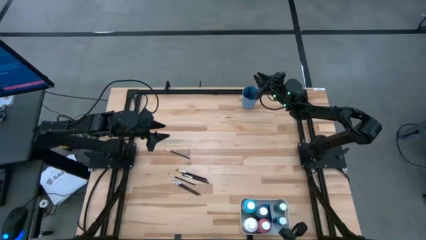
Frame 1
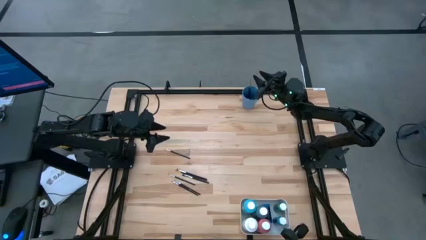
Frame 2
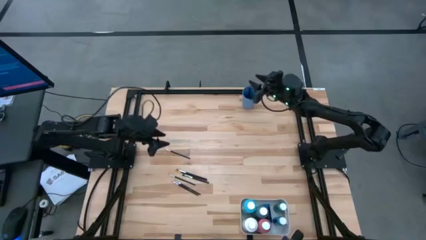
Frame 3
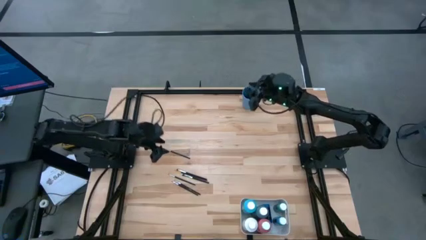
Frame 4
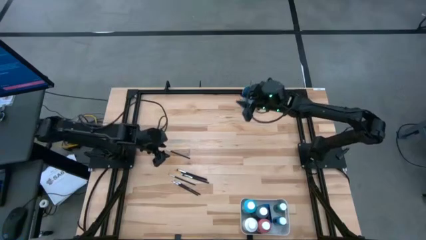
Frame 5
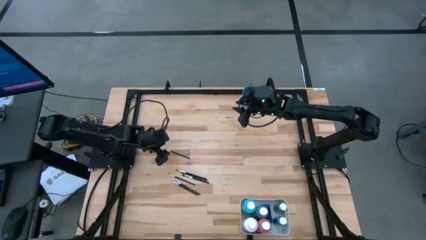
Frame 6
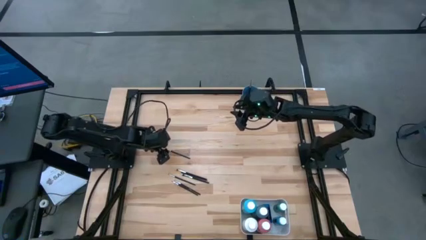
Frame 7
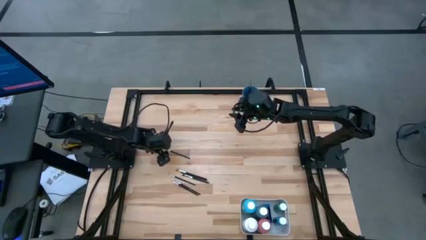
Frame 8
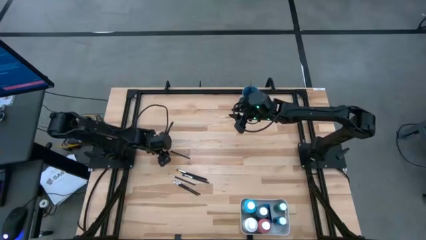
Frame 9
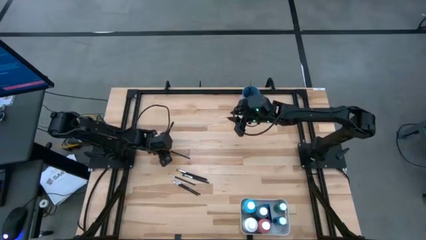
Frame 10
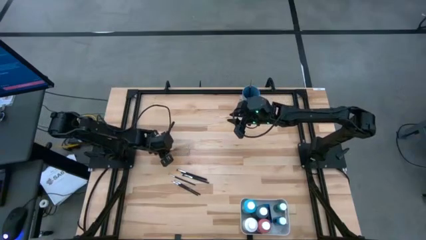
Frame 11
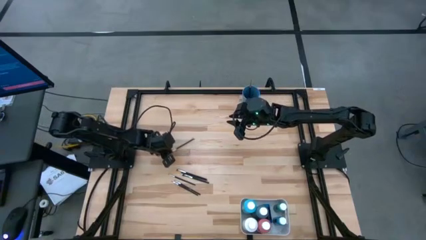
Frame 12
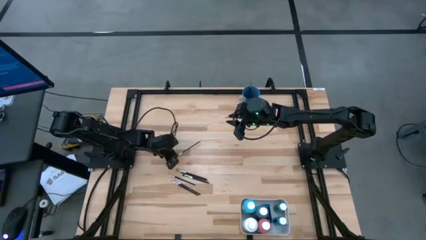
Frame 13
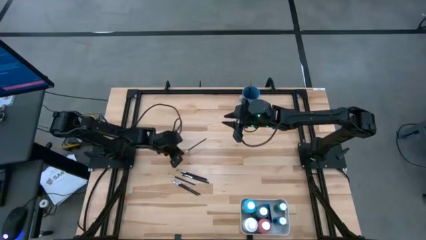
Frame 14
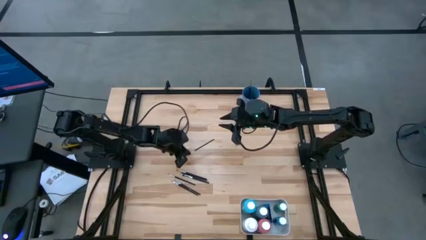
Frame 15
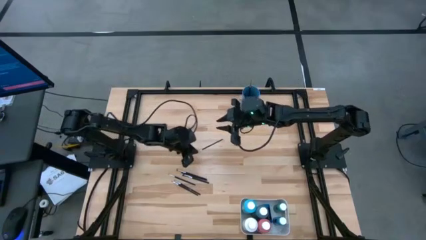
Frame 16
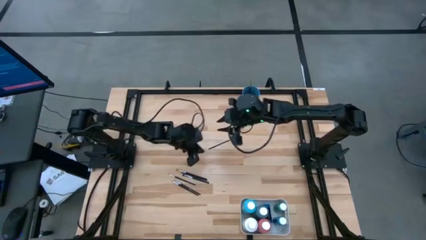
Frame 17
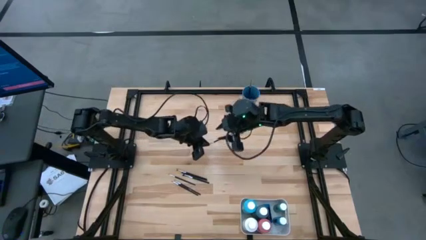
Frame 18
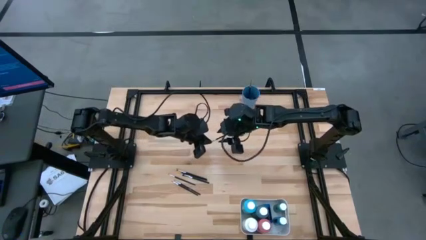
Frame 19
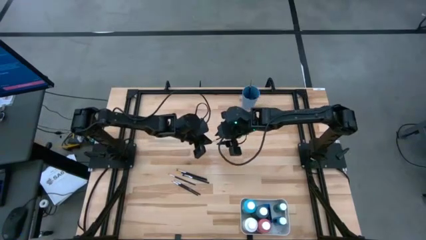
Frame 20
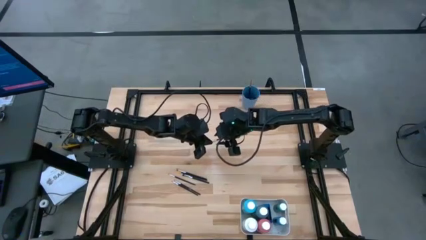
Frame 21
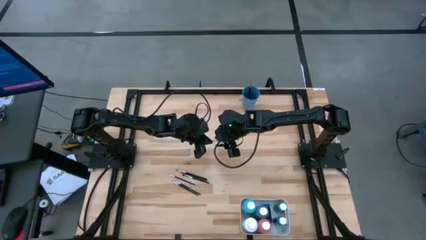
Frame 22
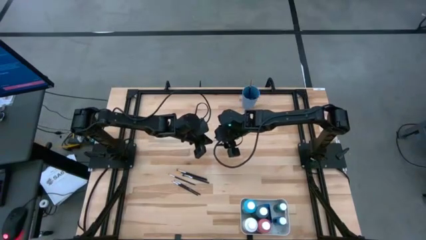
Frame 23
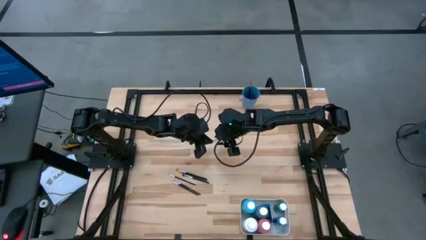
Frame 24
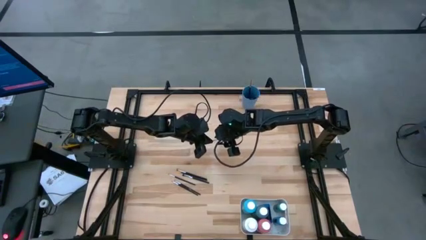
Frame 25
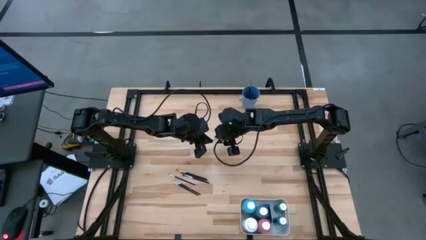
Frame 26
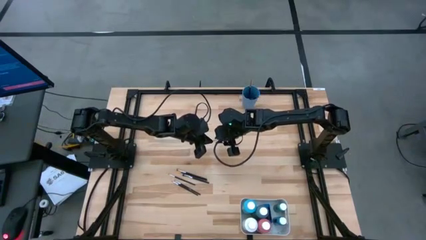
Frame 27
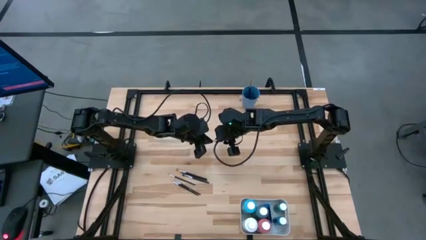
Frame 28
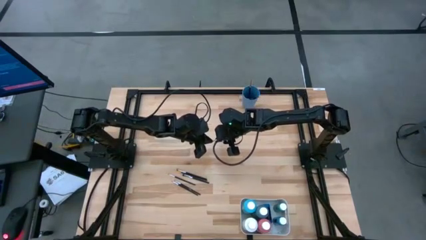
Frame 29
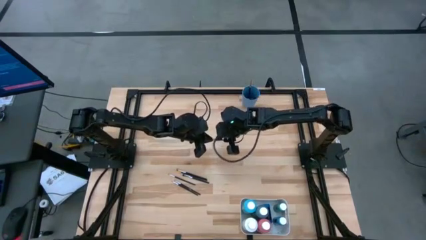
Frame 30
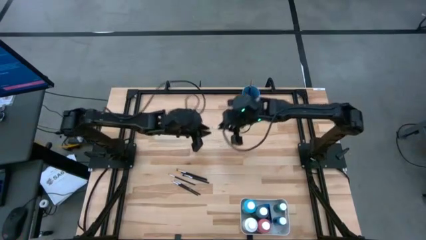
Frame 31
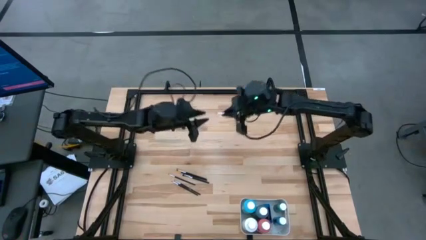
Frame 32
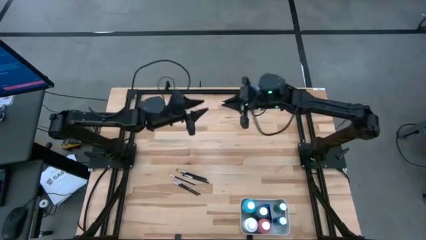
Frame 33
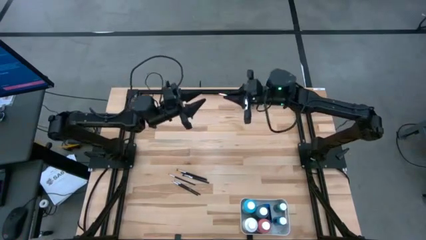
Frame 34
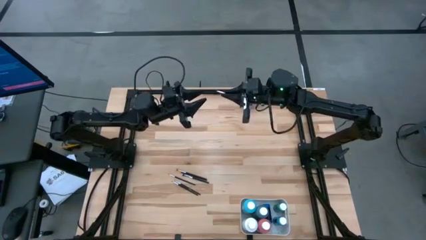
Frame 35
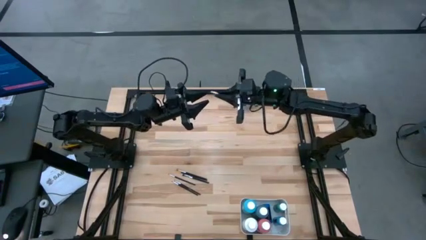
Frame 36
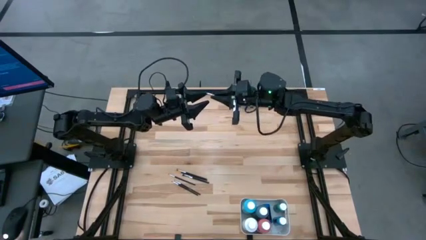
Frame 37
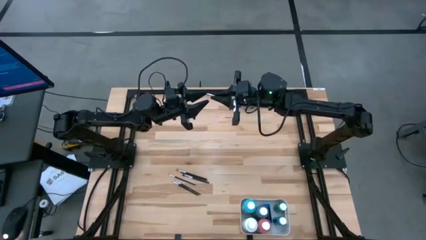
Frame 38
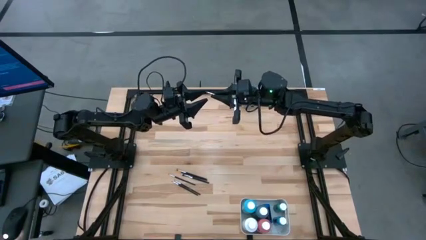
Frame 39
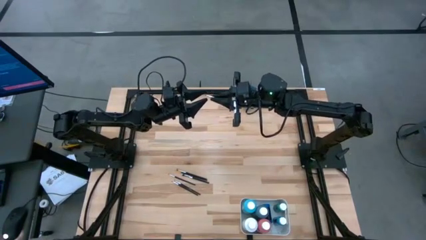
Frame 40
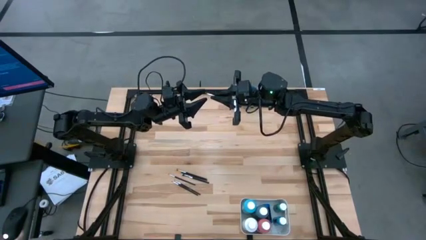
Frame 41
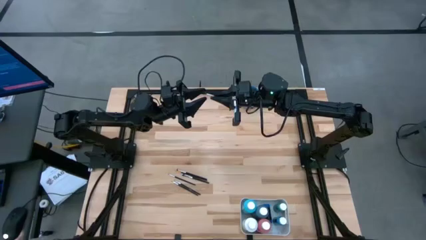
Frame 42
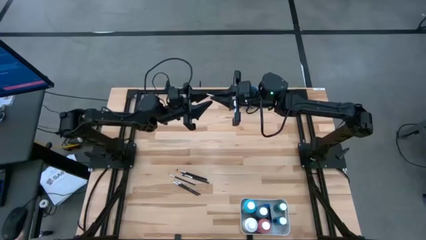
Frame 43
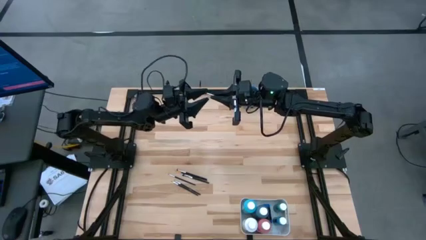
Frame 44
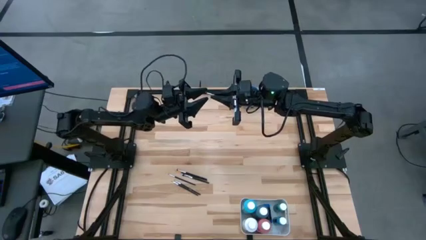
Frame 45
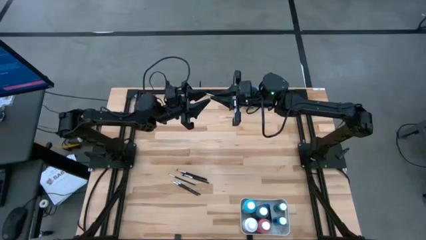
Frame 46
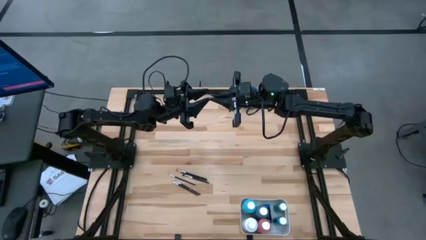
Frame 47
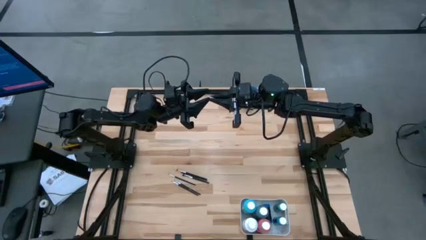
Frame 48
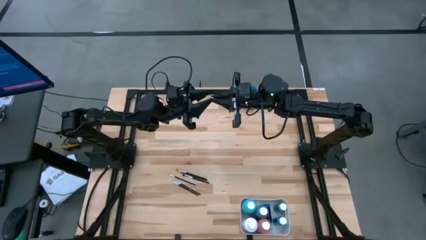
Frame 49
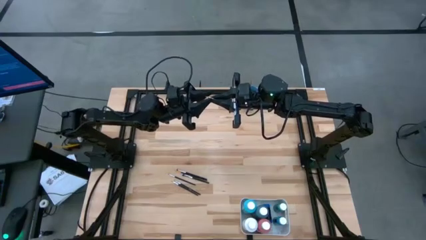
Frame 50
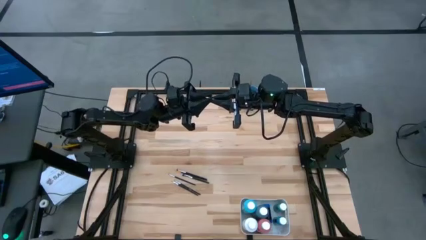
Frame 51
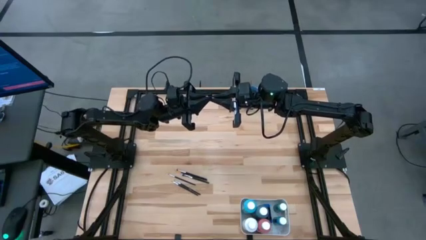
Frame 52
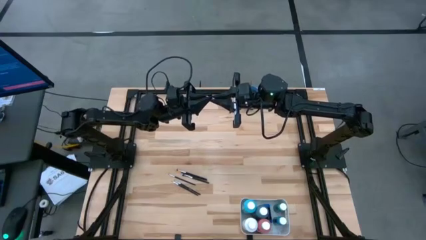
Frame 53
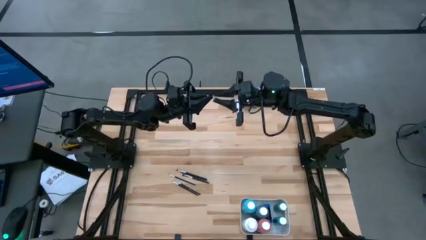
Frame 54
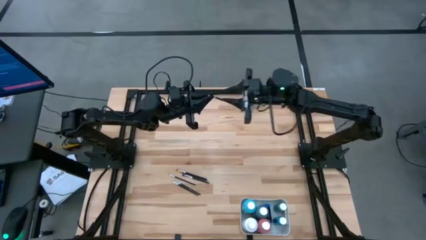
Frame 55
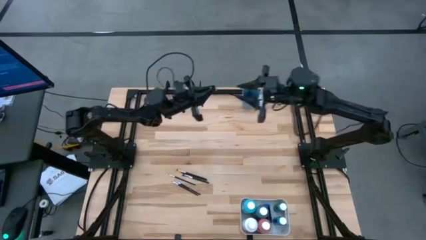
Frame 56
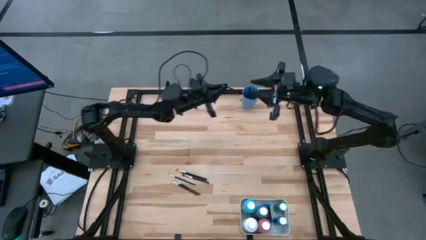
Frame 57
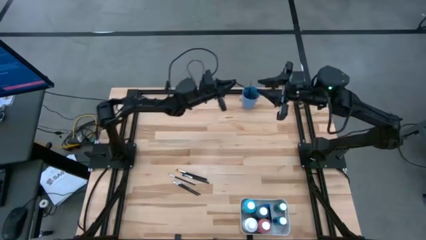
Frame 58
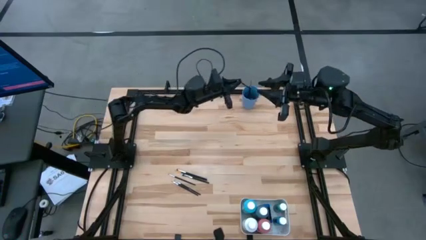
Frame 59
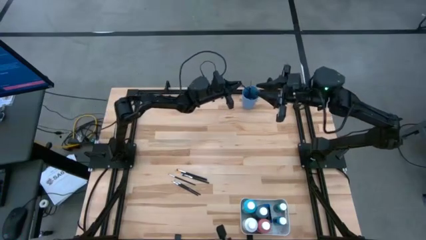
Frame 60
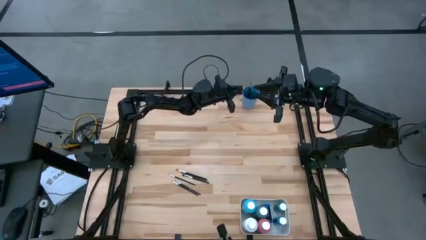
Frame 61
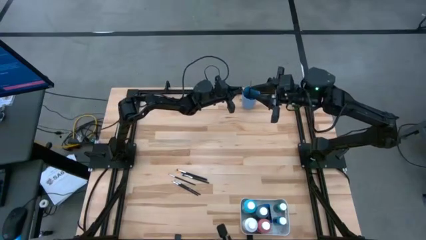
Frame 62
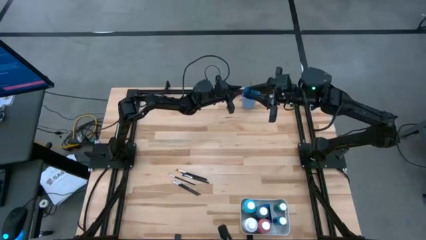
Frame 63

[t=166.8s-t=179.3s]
Task: Pick & Place Paint Supplies
Put the silver paintbrush into the blue cup
